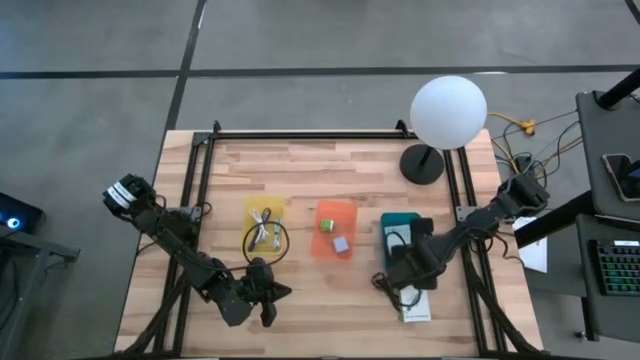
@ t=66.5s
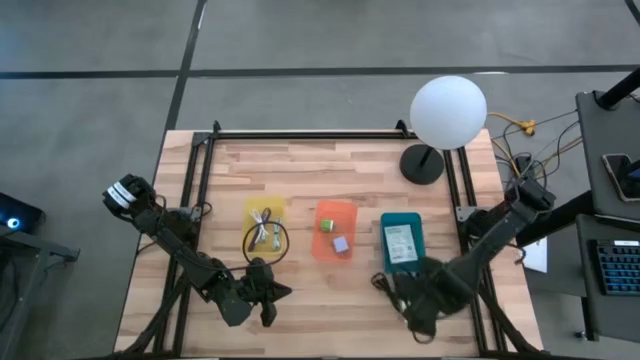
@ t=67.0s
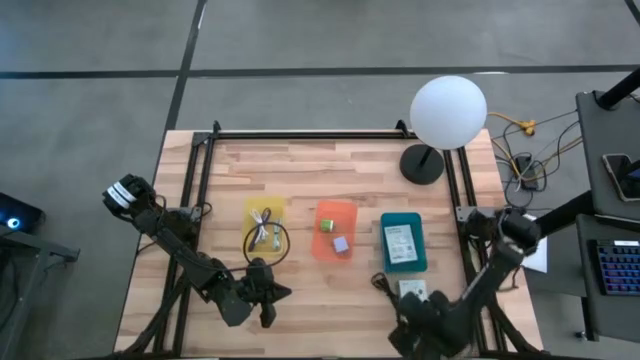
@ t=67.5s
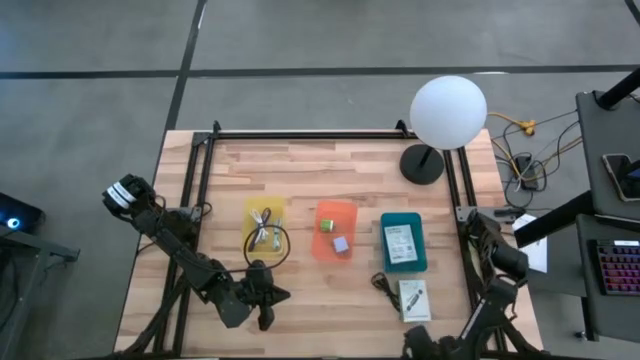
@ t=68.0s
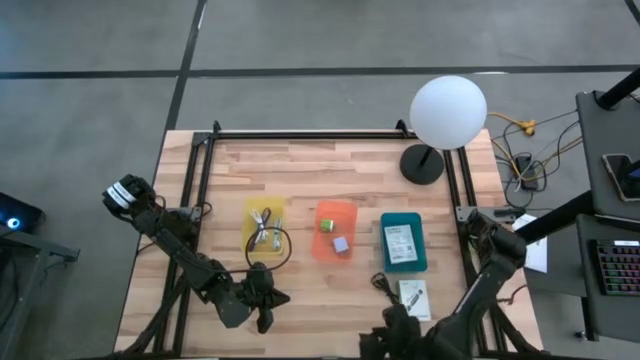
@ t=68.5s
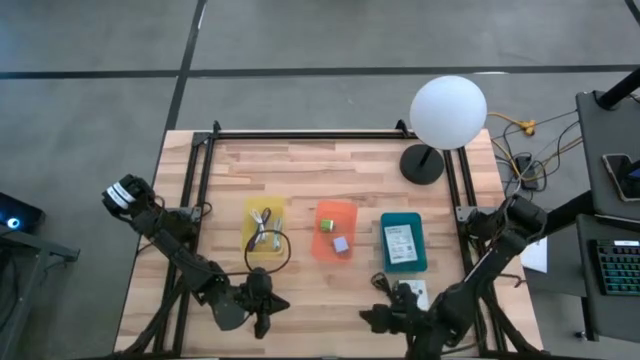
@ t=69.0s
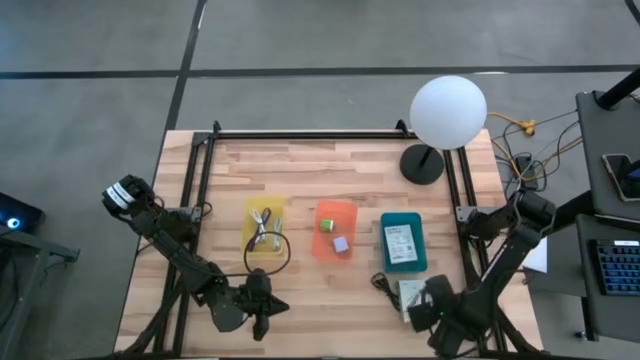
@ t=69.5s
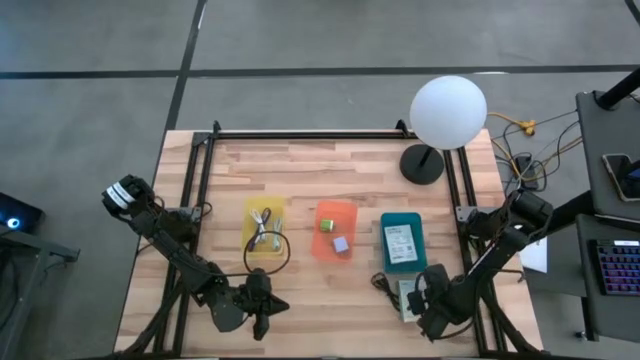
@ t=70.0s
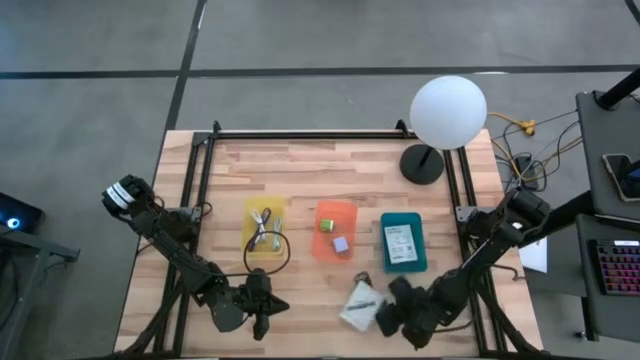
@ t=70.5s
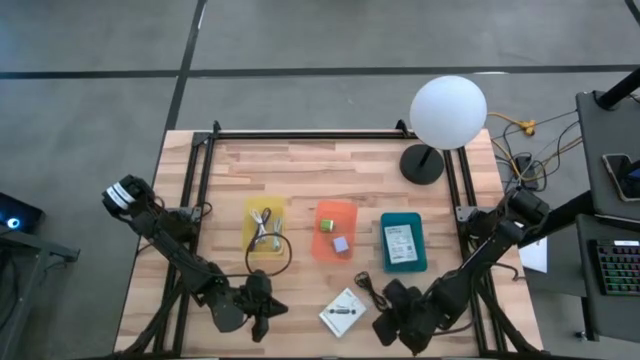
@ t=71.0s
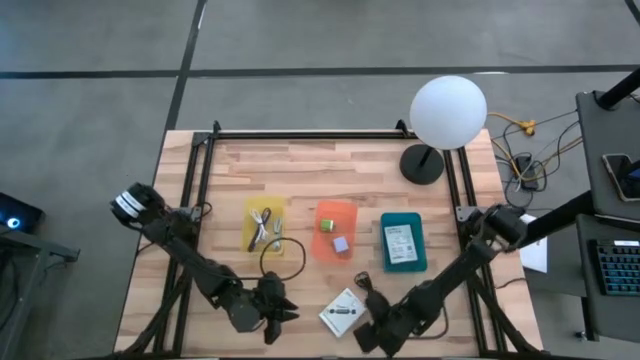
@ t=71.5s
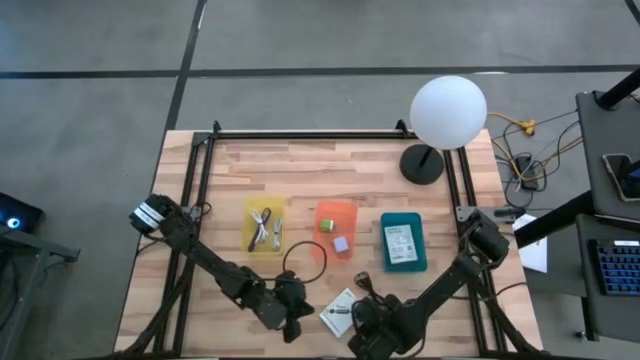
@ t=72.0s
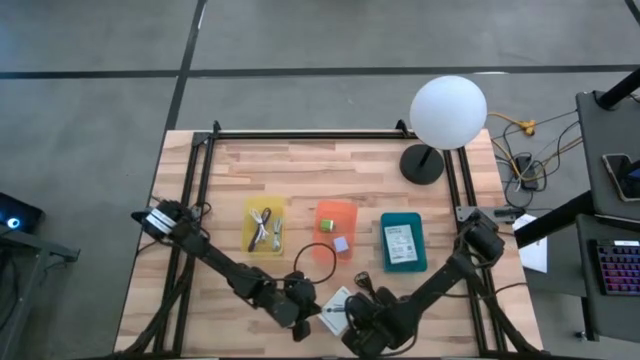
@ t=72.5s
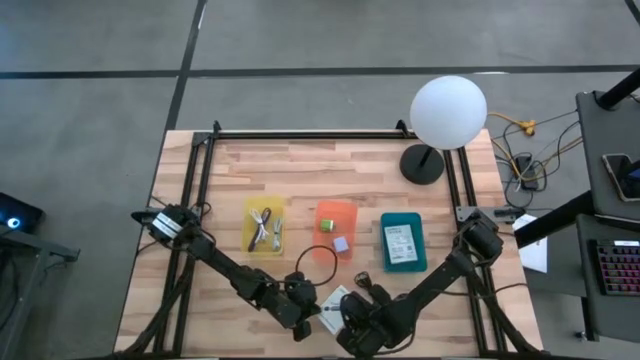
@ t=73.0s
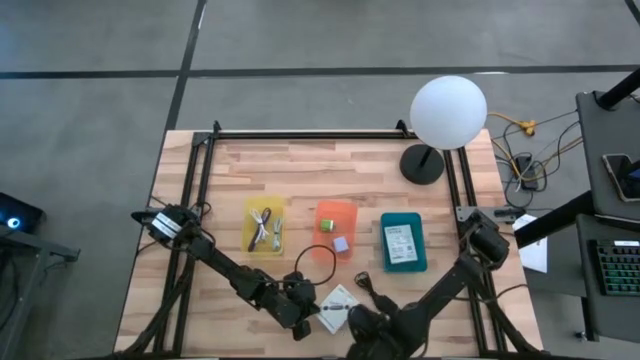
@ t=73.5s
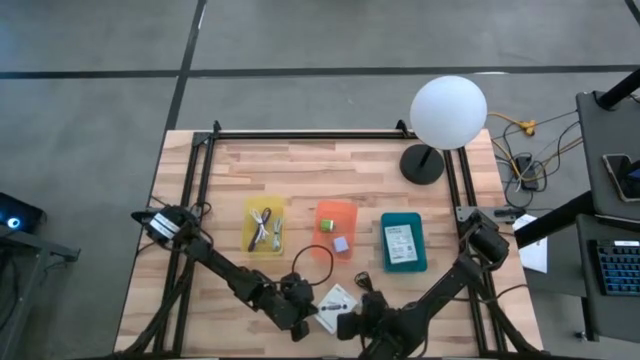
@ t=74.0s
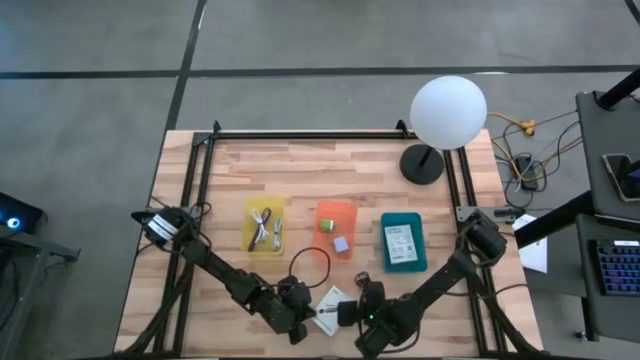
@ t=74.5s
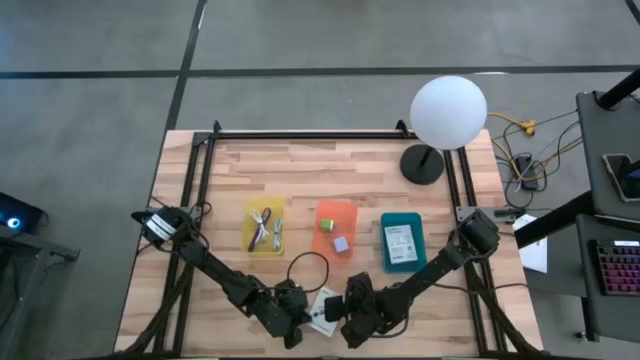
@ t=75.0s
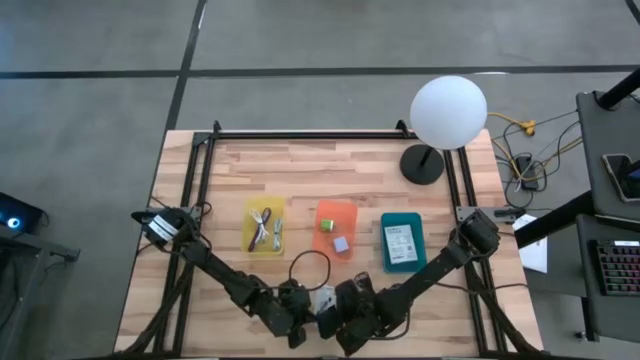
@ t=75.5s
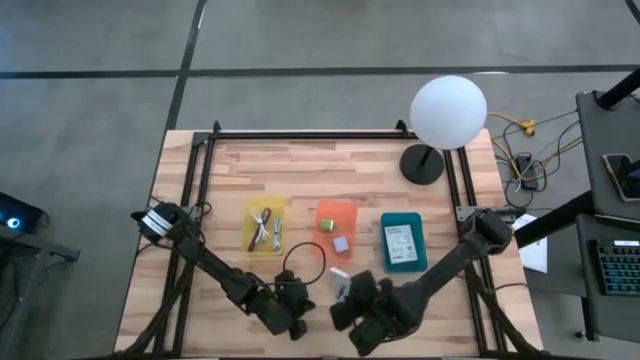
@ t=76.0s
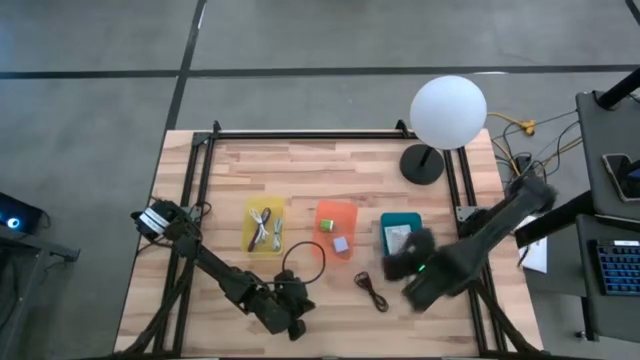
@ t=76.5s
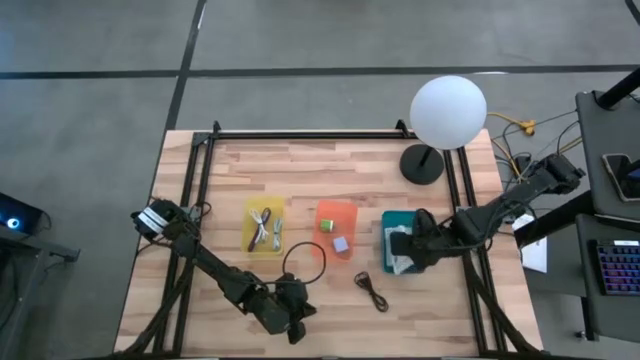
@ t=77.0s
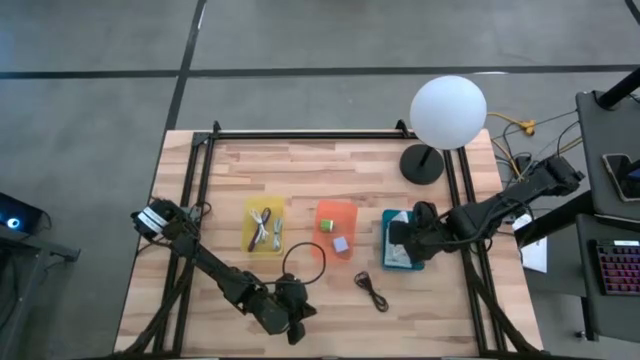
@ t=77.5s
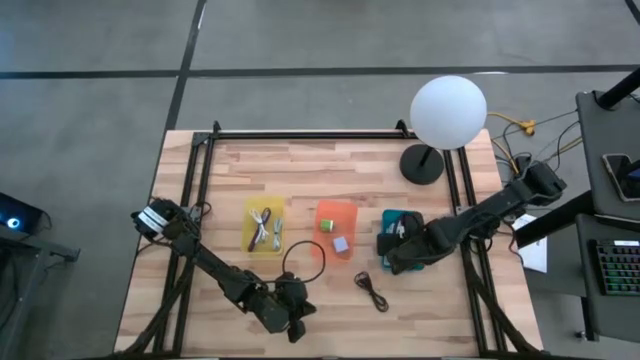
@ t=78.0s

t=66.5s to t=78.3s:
Task: Pick and place items into bin
Put the white card reader box into the blue bin

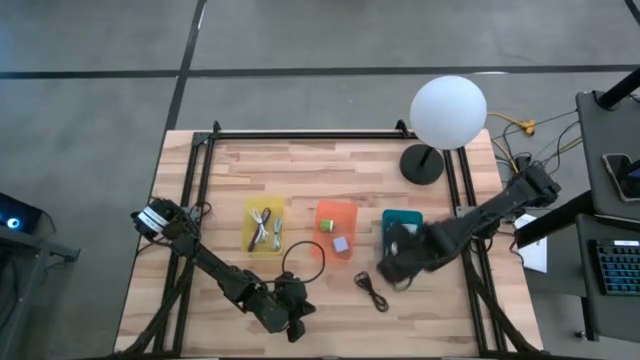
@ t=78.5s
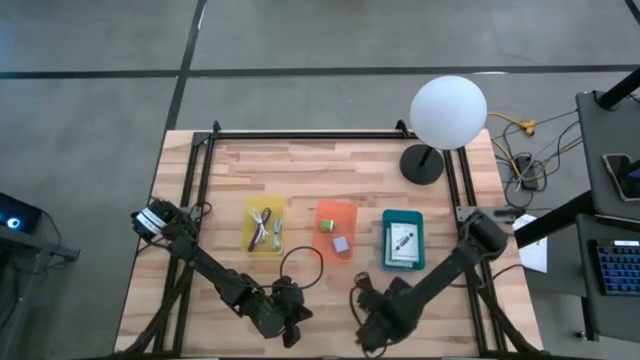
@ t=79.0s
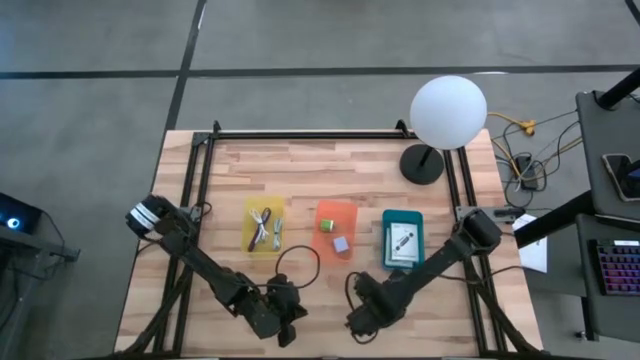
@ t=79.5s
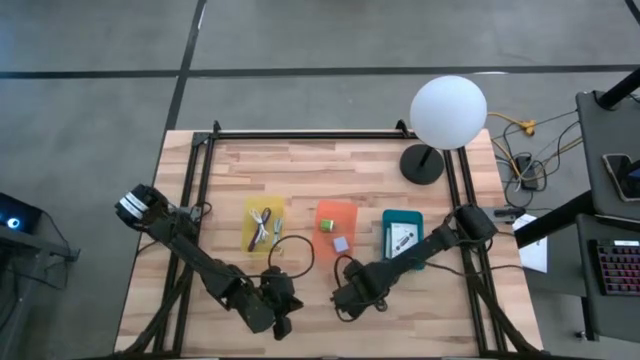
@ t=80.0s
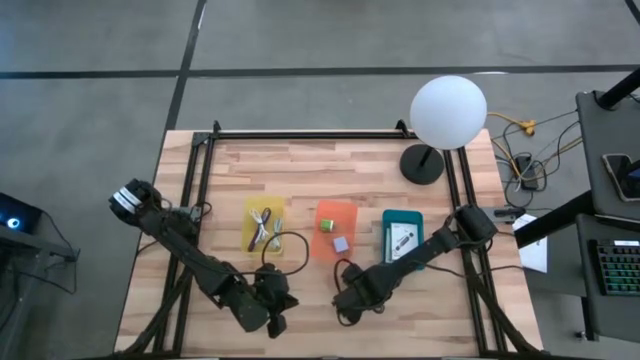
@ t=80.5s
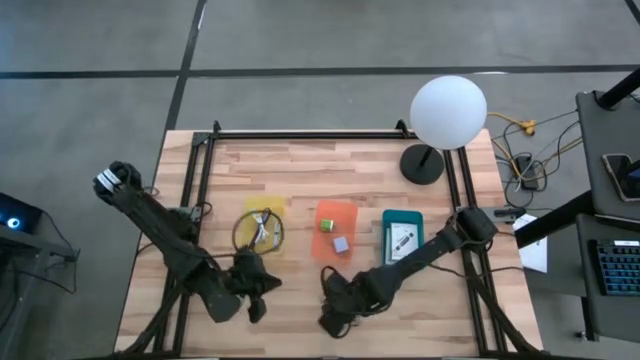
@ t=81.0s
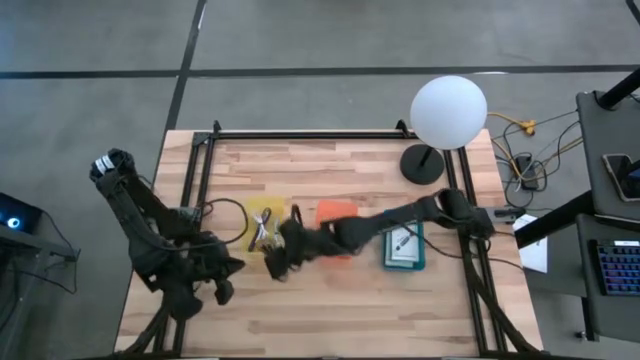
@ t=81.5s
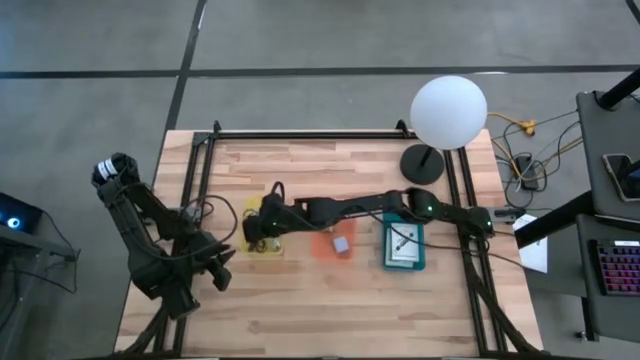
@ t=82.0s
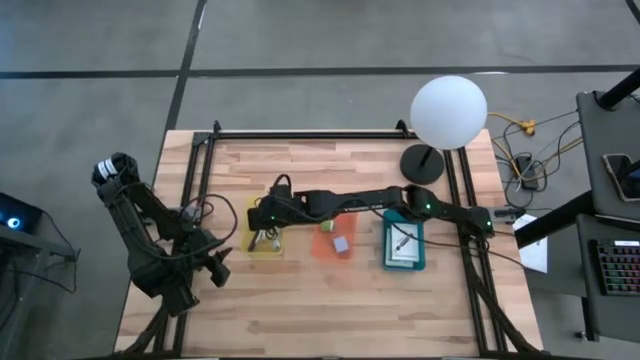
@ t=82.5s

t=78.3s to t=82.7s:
Put the black charger cable into the yellow bin

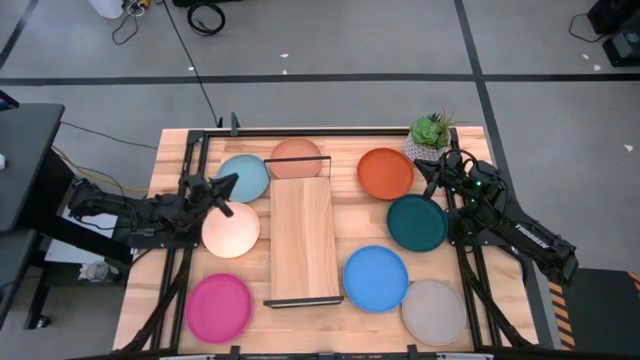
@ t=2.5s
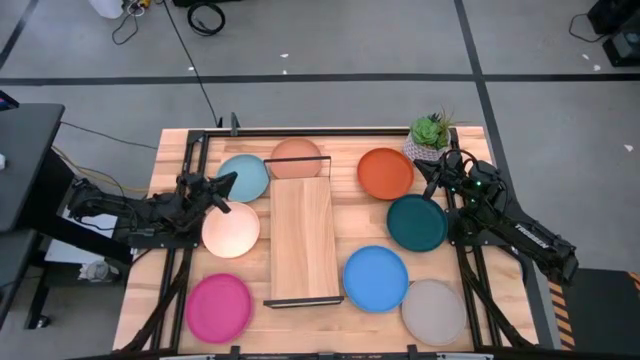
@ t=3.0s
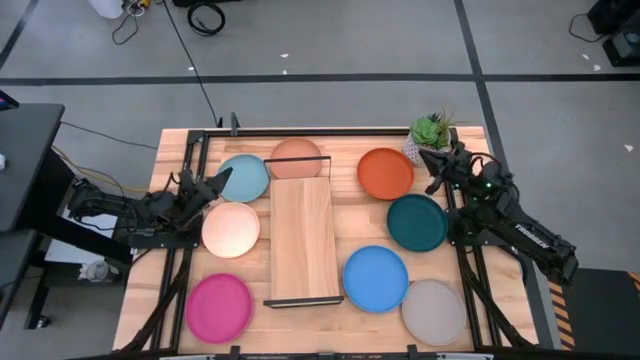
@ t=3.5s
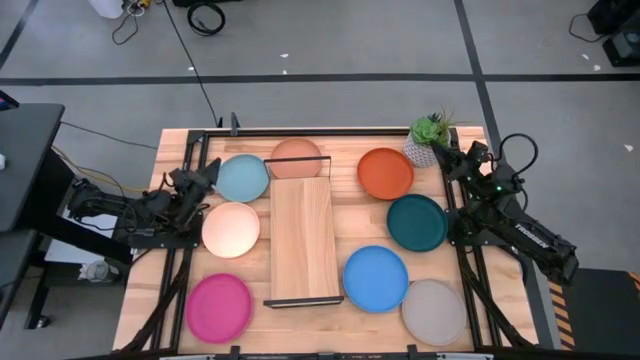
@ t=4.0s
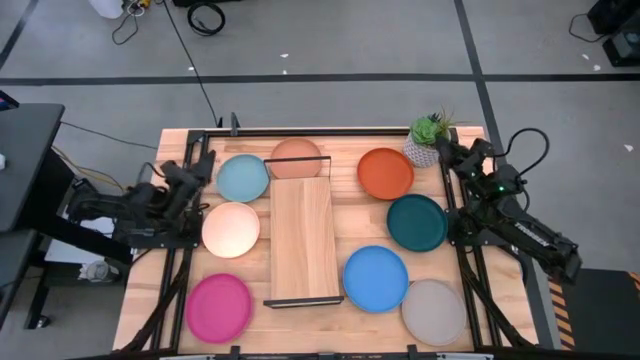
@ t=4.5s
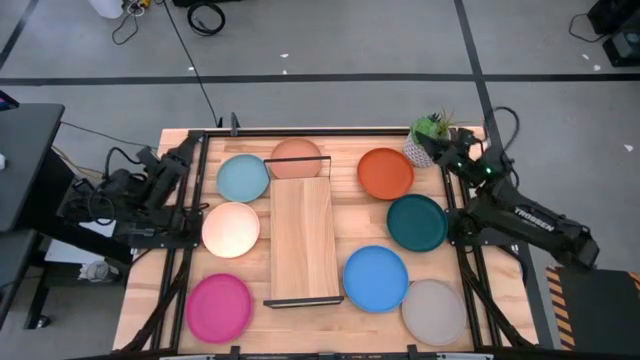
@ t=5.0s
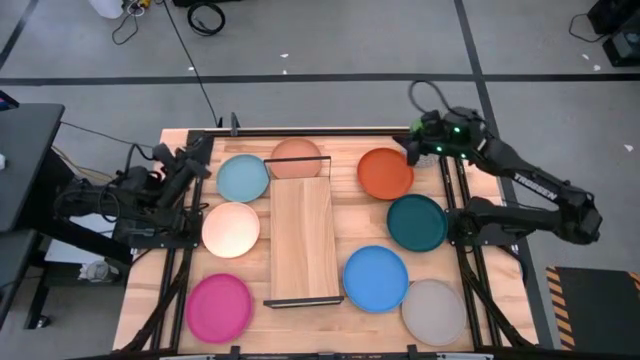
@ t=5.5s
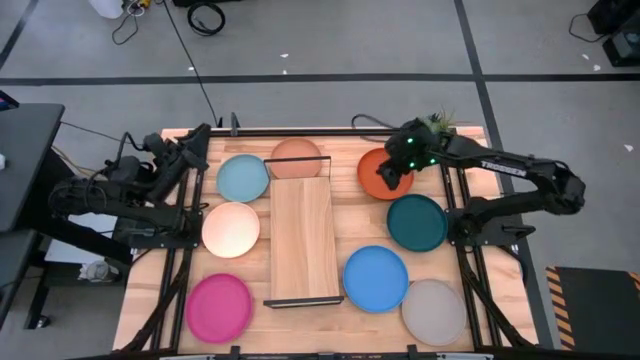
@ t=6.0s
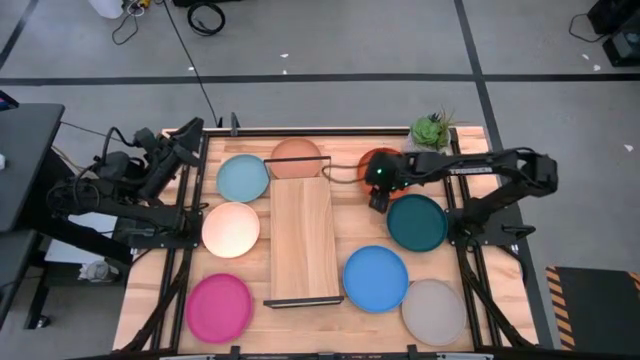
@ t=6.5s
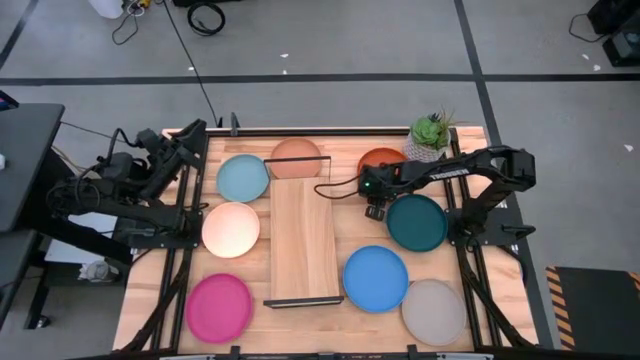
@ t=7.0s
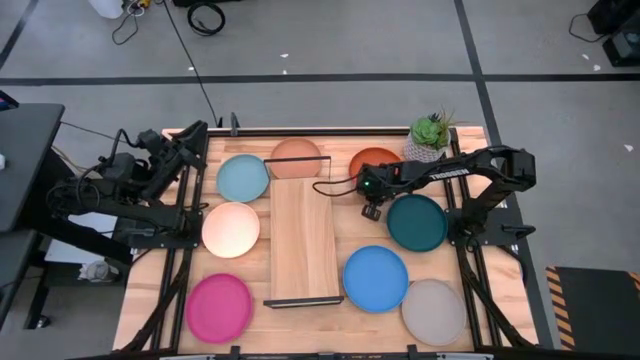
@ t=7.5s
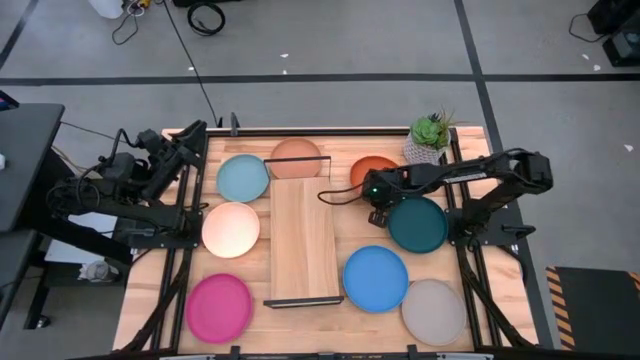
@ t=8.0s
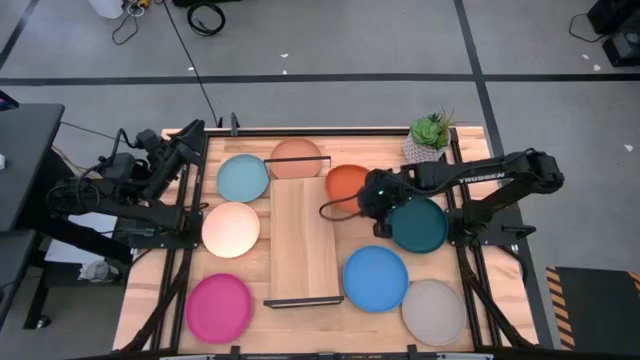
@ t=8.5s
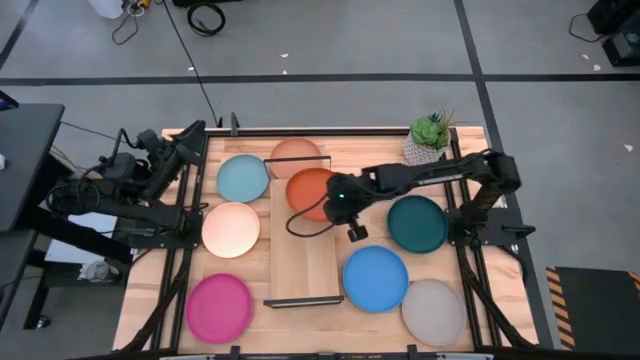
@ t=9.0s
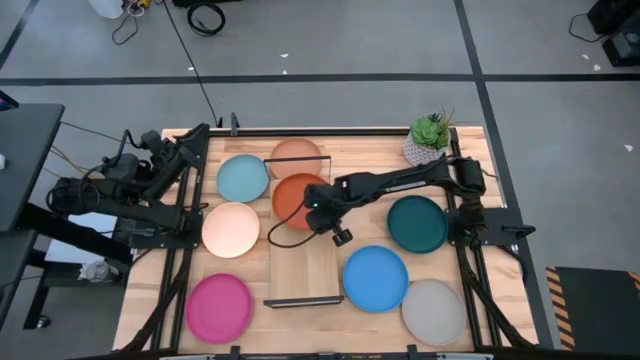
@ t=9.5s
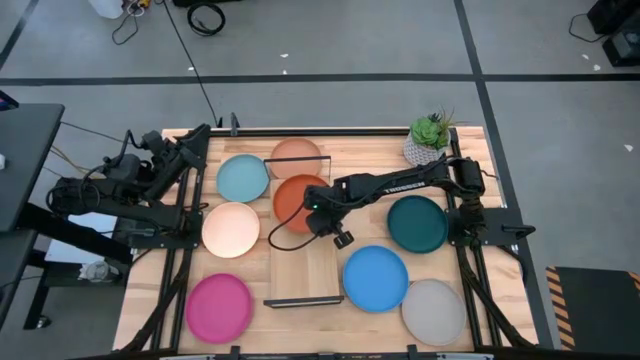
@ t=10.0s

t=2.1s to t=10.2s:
Task: Place and stack plates onto a shelf
Put the orange plate on the shelf
